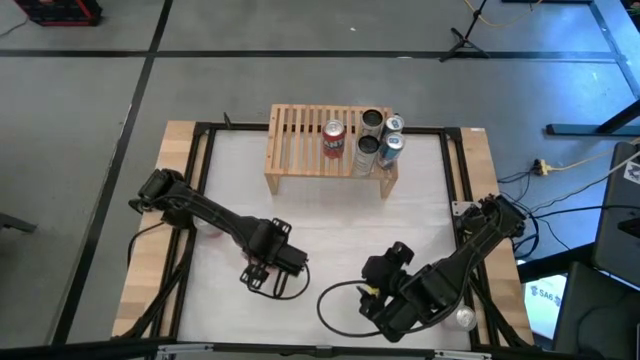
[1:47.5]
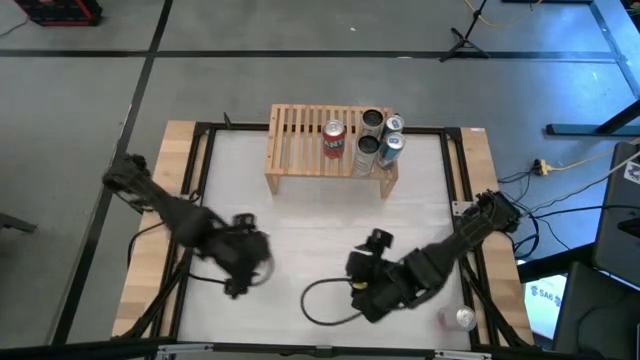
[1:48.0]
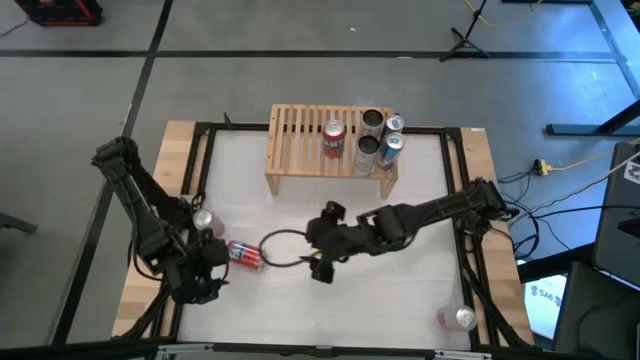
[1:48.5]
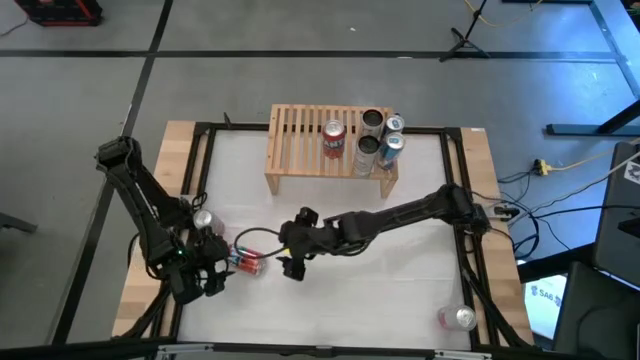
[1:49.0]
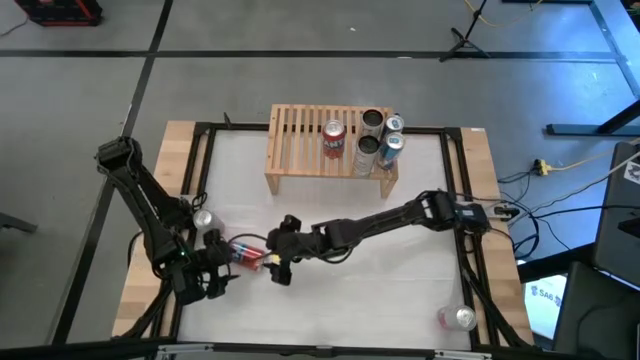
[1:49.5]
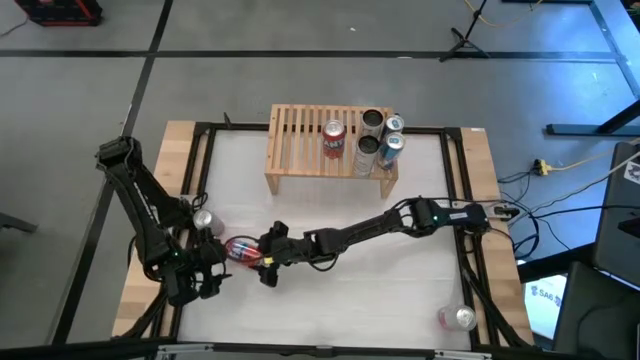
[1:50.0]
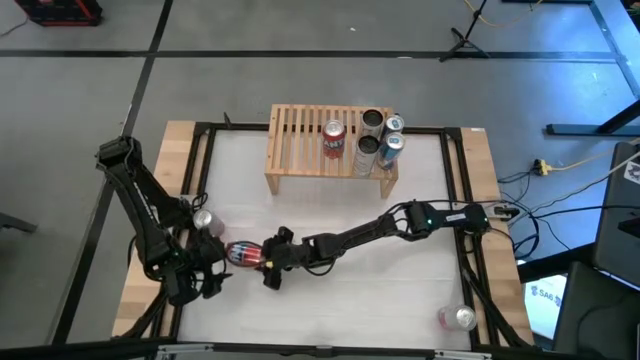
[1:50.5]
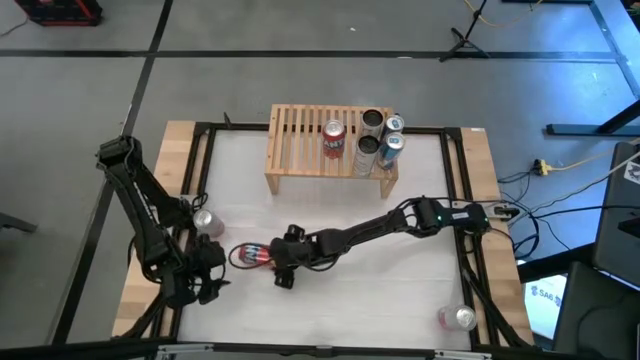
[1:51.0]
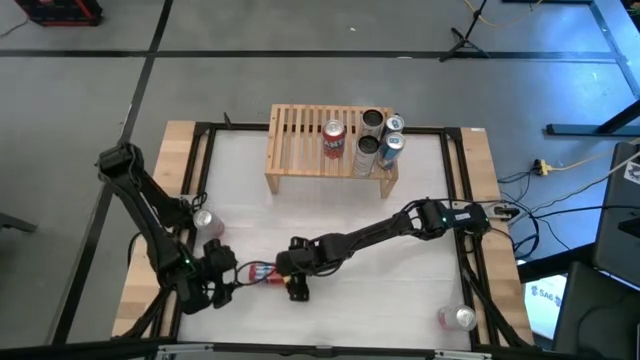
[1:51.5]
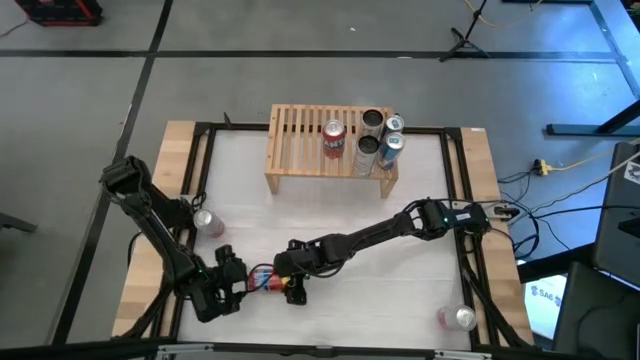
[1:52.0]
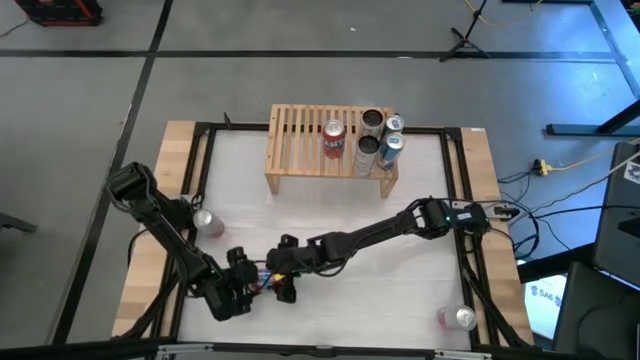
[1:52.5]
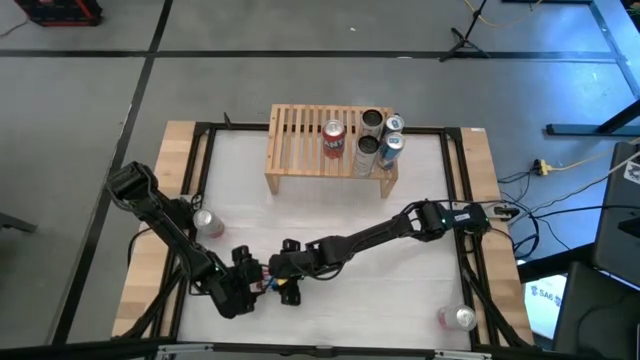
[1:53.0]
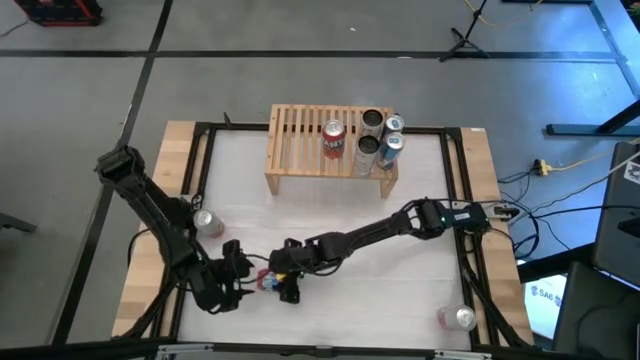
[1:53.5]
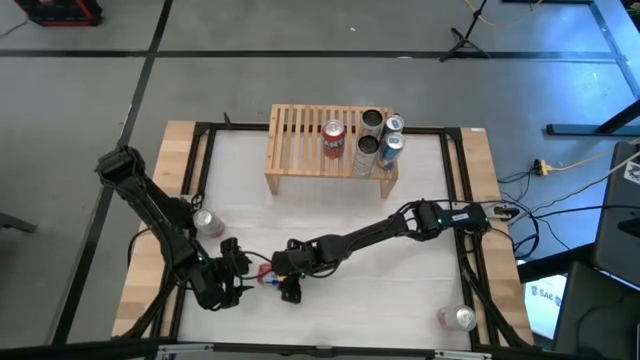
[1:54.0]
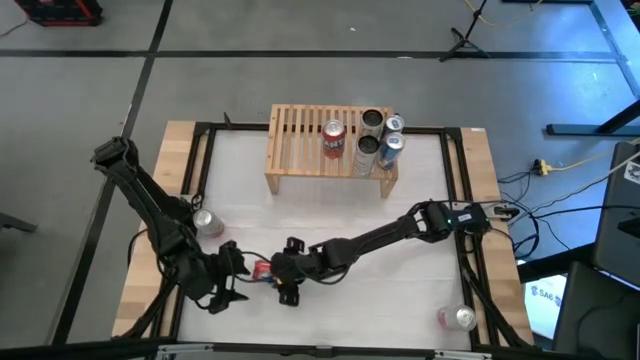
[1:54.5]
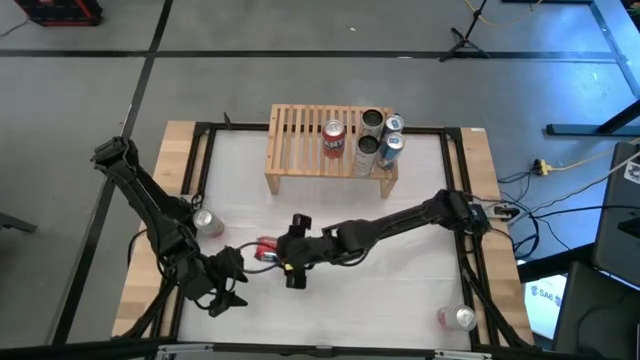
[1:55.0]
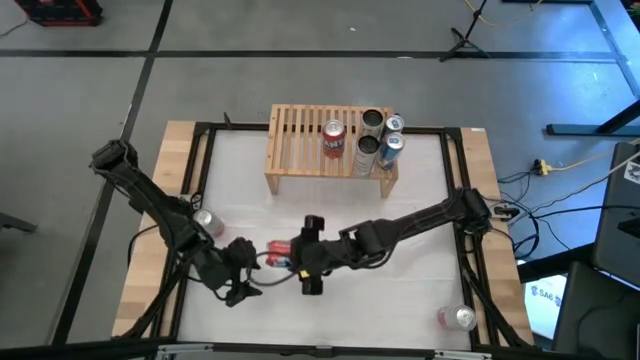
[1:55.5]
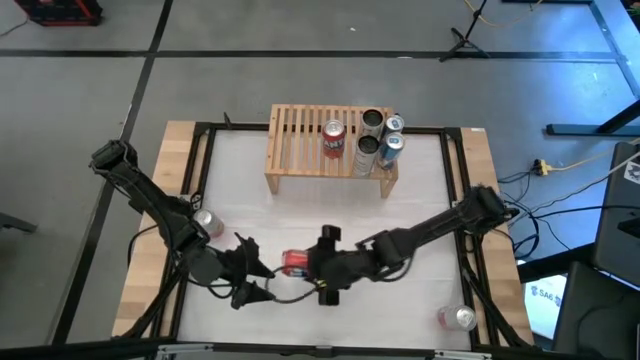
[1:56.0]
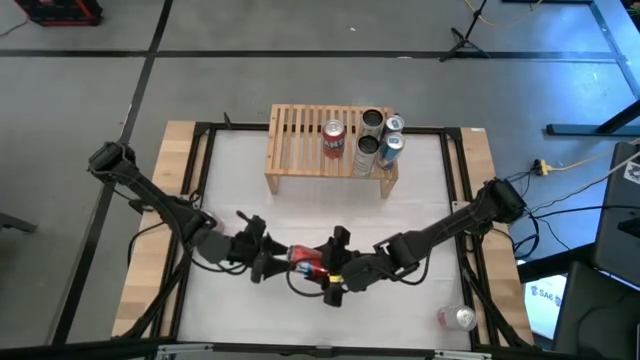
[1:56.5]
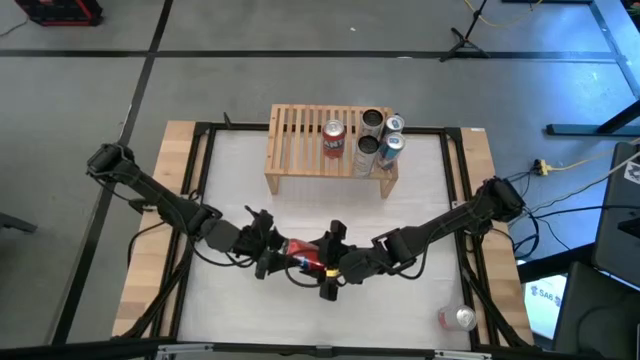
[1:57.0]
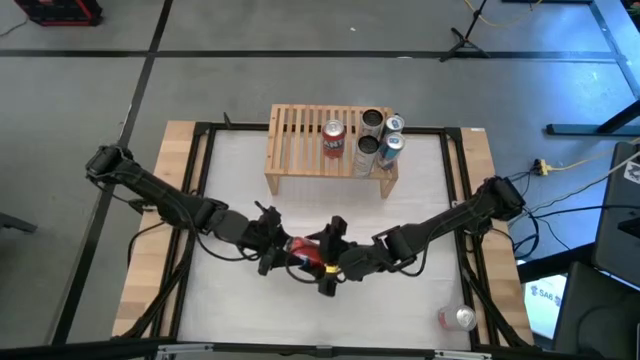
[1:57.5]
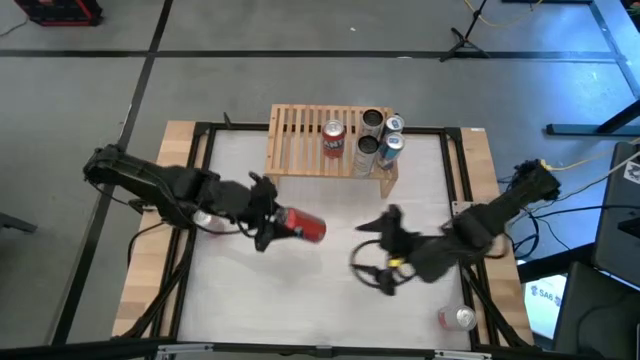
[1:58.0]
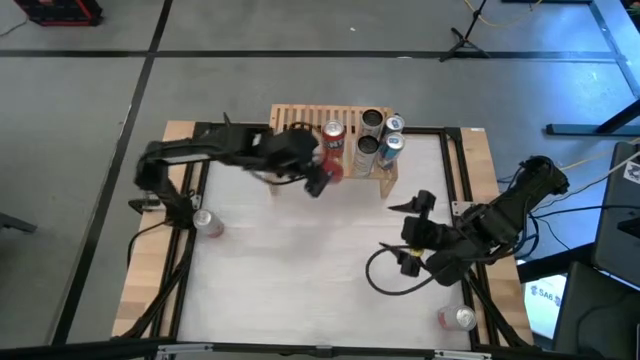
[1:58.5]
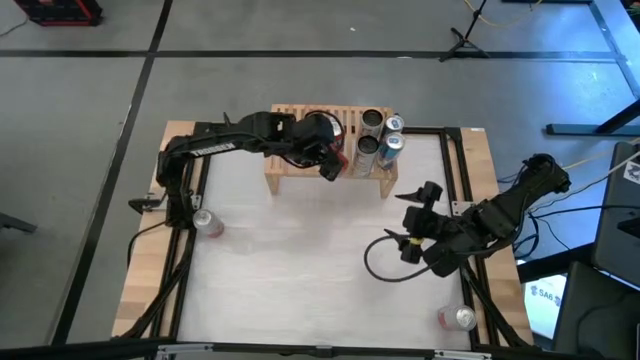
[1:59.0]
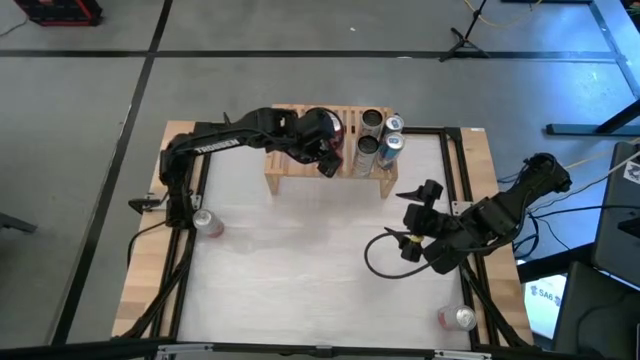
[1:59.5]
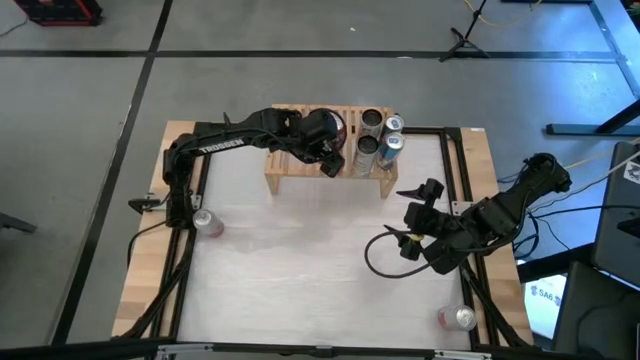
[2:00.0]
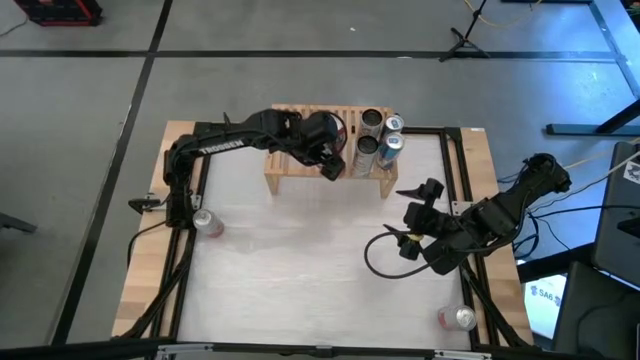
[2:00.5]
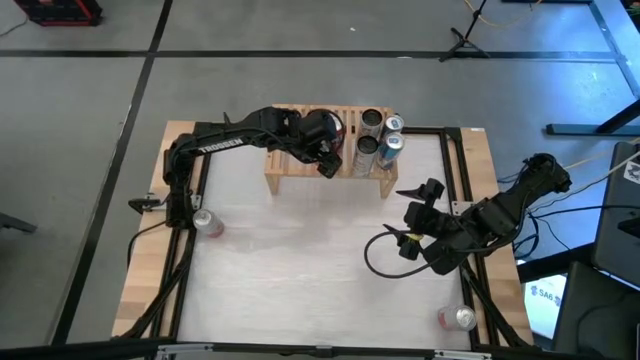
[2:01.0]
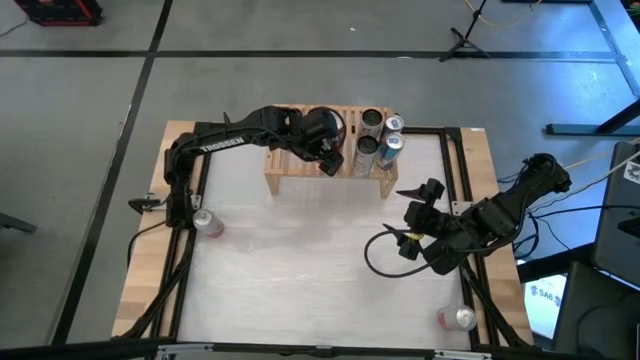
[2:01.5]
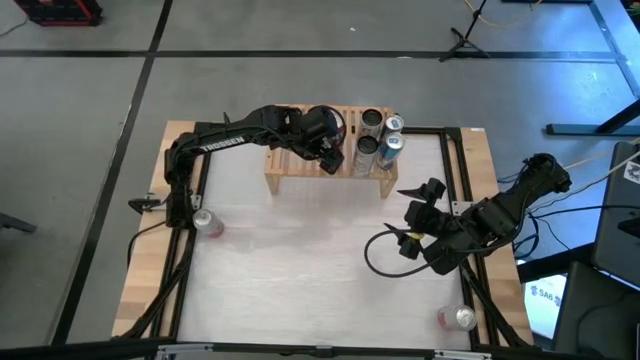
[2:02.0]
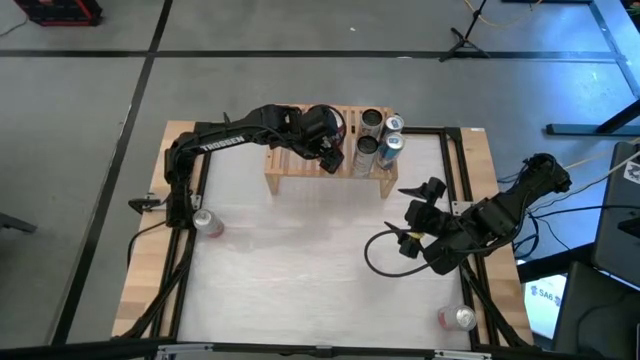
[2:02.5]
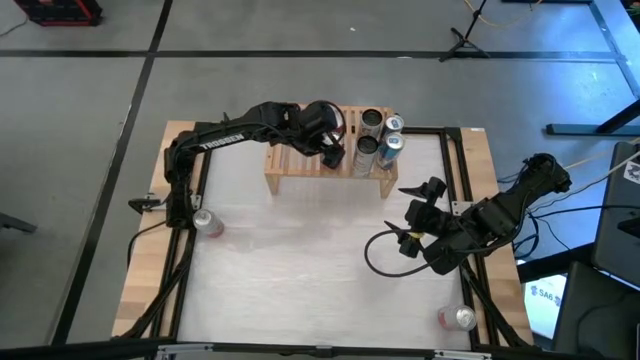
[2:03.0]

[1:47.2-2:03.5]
Task: Place canned beverage on shelf
Put the red soda can on the shelf aligned with the other red soda can

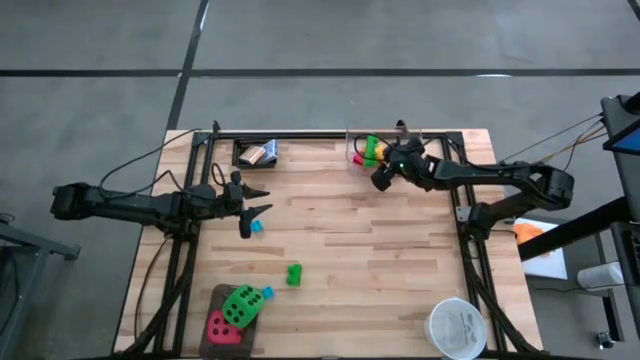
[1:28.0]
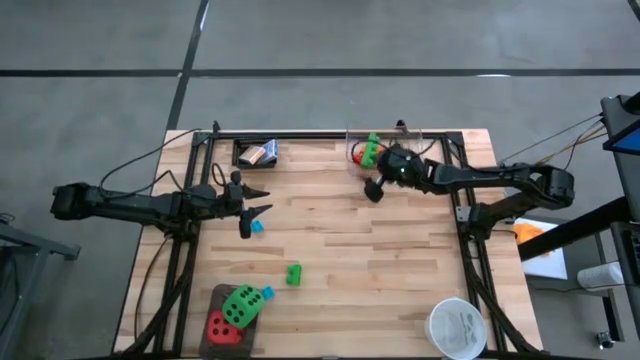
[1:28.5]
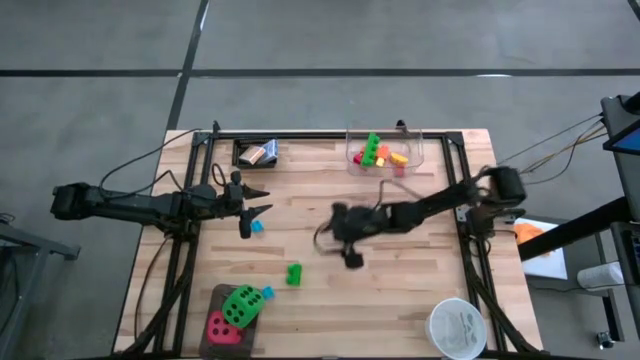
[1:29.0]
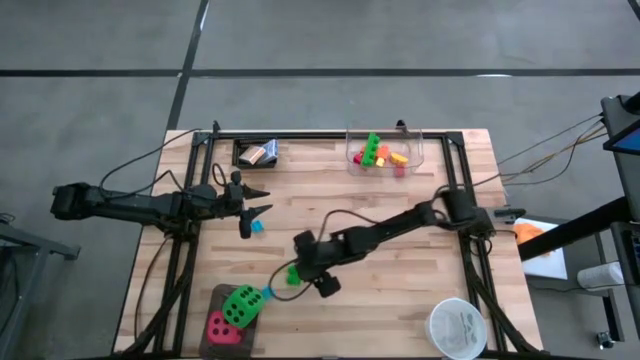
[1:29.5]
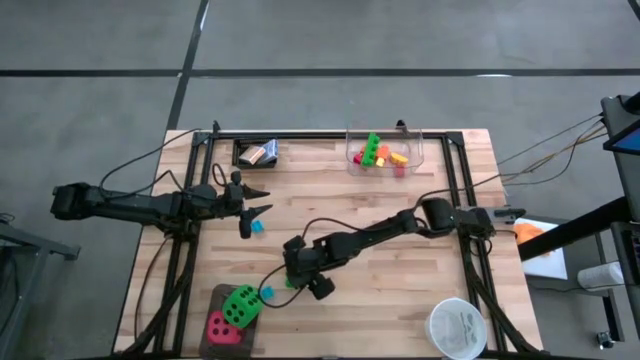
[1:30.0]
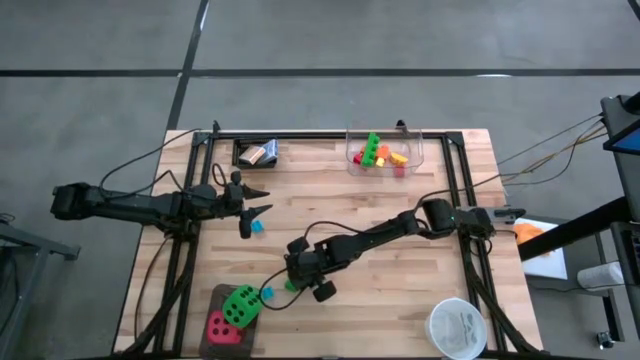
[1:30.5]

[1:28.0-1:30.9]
Task: Pick & Place Toys
Put the green game piece into the transparent bin
